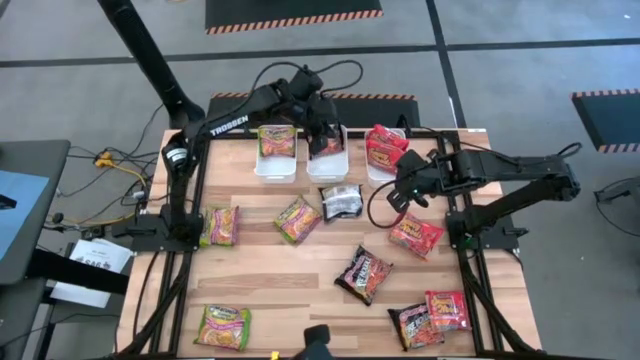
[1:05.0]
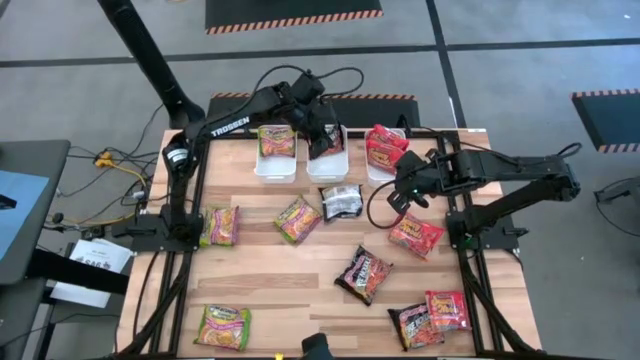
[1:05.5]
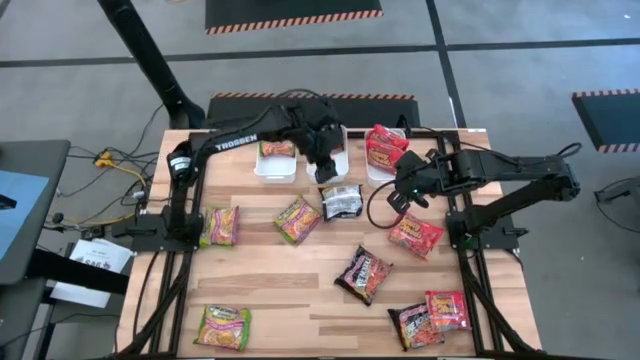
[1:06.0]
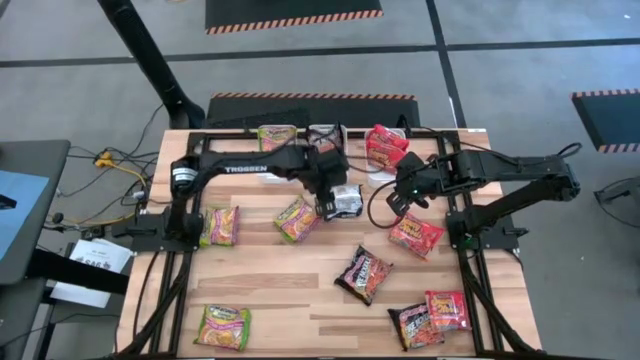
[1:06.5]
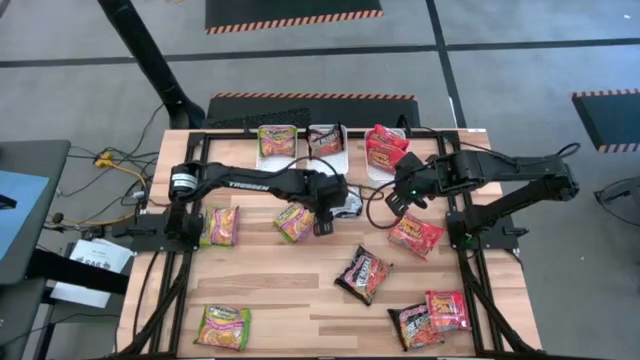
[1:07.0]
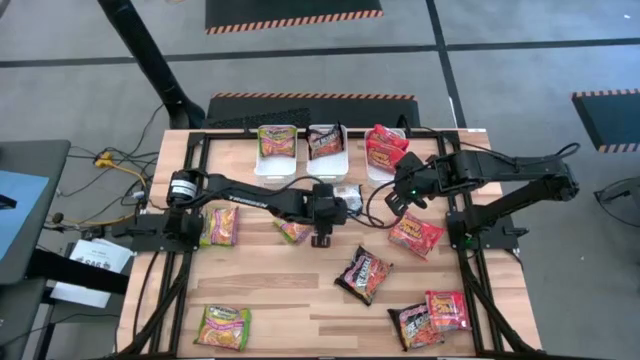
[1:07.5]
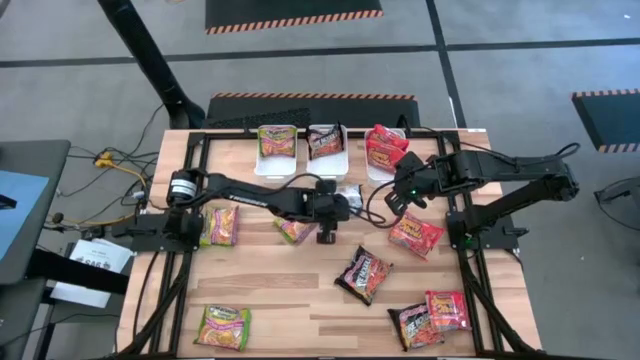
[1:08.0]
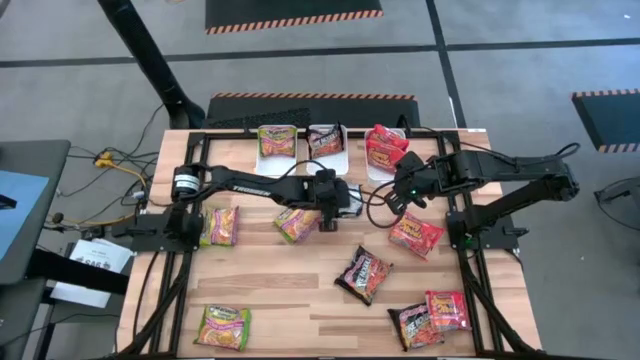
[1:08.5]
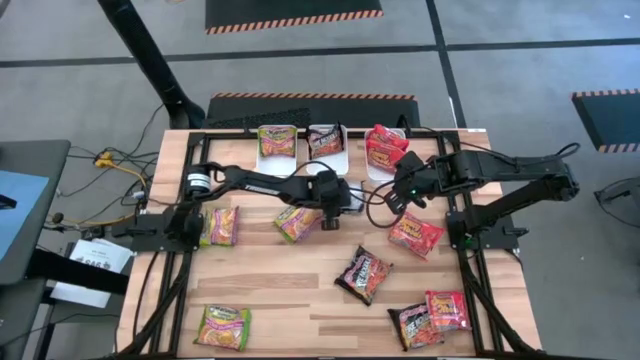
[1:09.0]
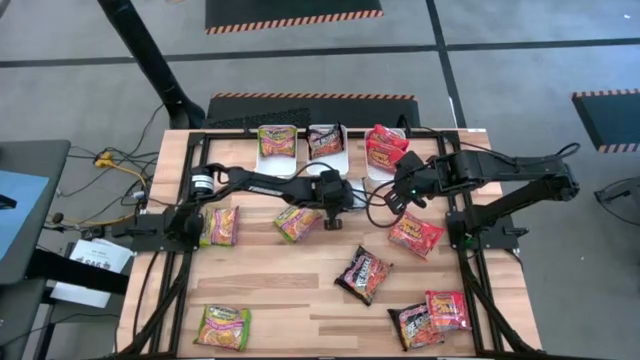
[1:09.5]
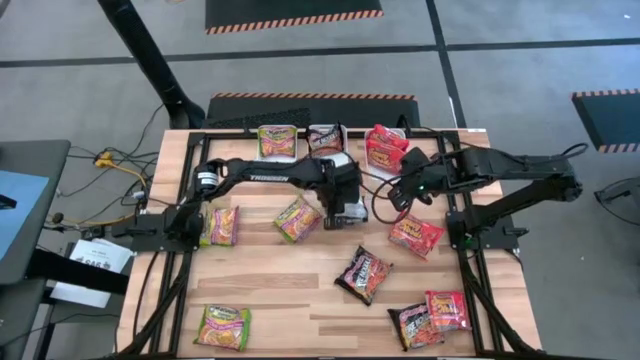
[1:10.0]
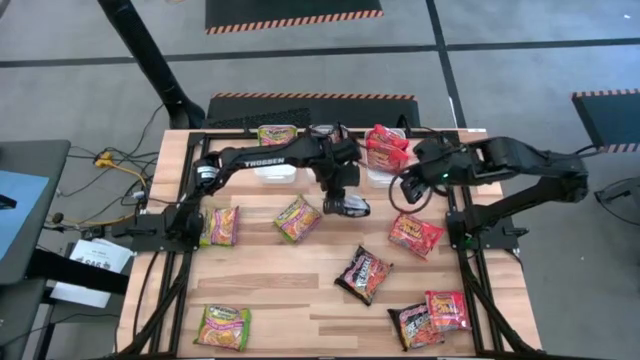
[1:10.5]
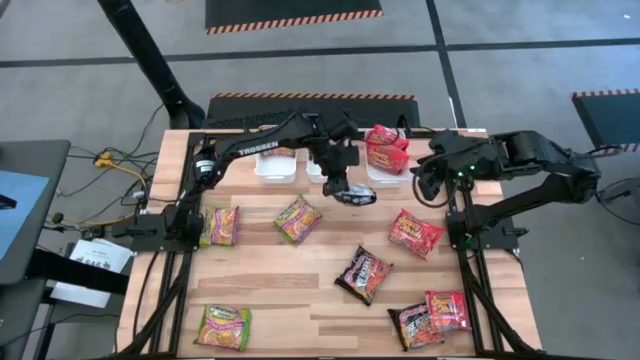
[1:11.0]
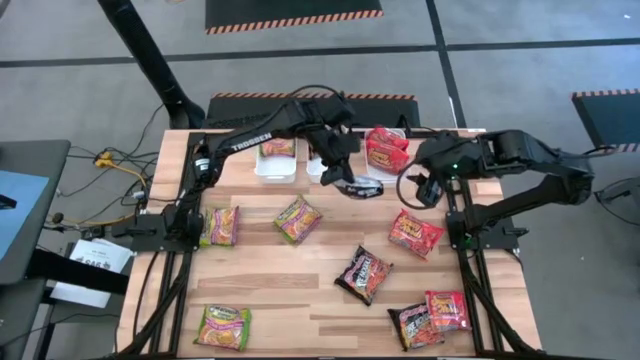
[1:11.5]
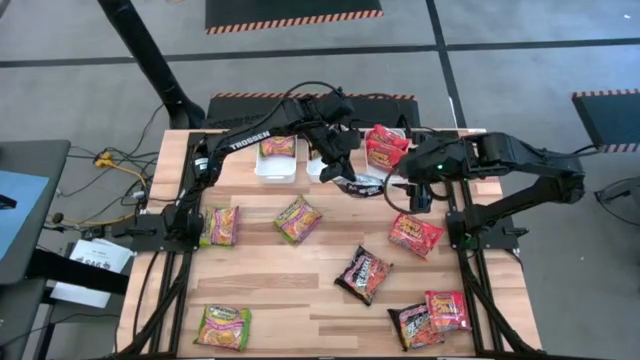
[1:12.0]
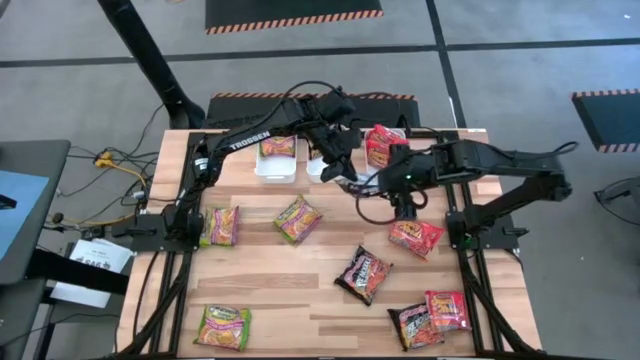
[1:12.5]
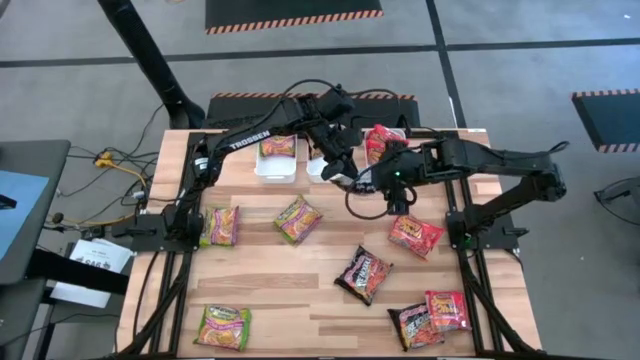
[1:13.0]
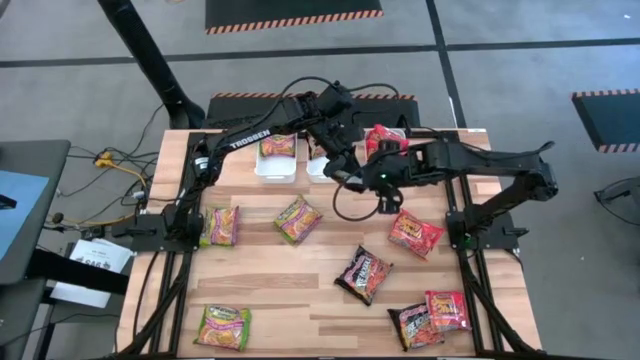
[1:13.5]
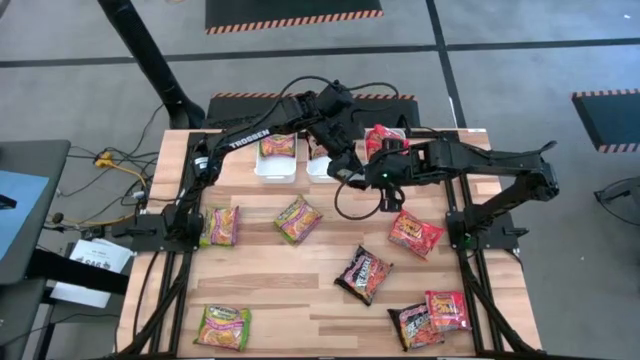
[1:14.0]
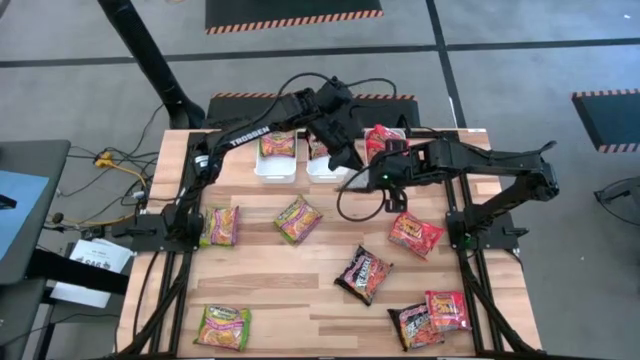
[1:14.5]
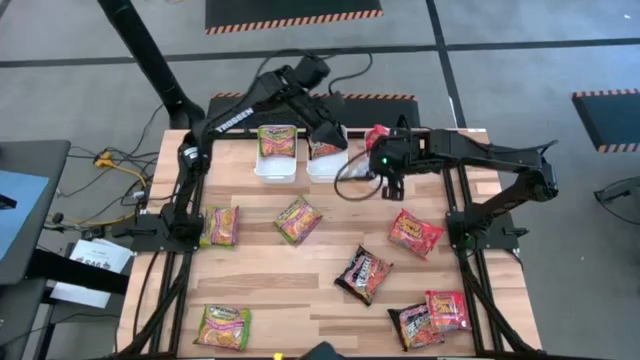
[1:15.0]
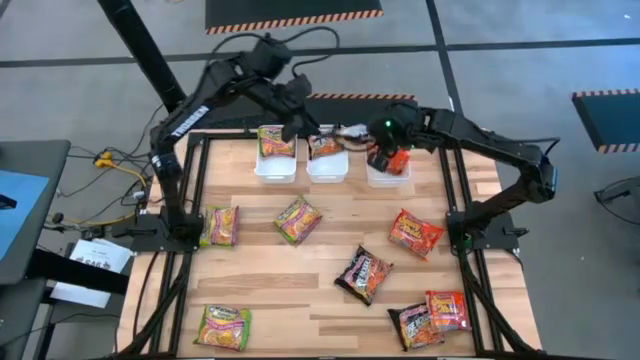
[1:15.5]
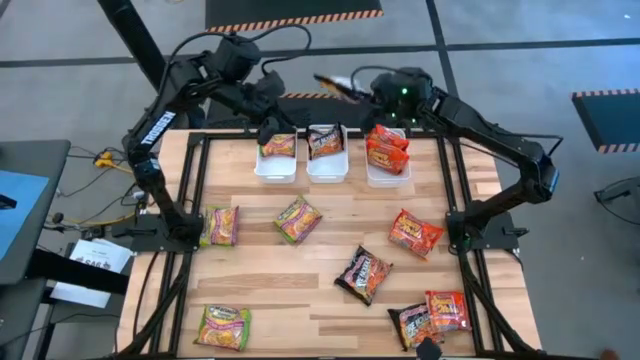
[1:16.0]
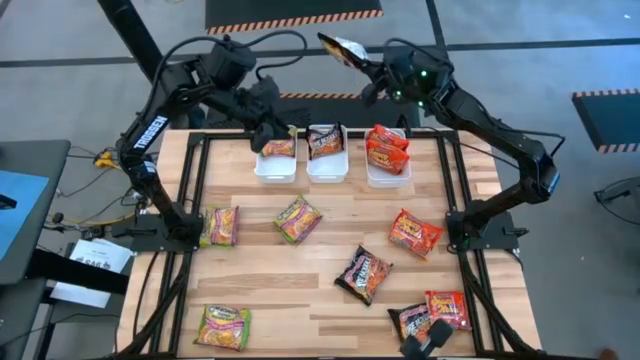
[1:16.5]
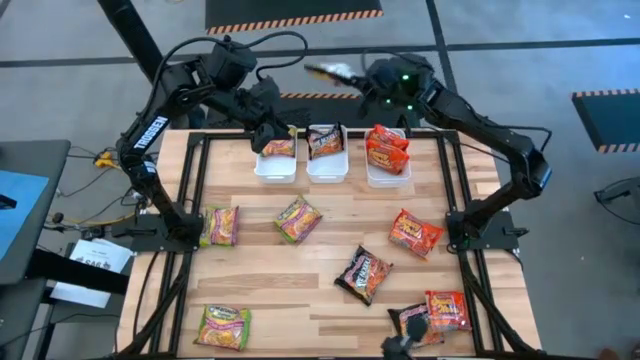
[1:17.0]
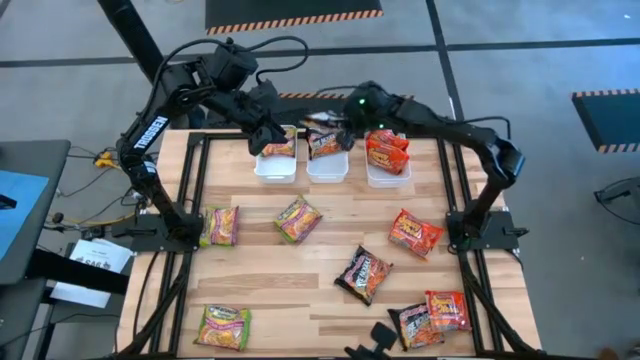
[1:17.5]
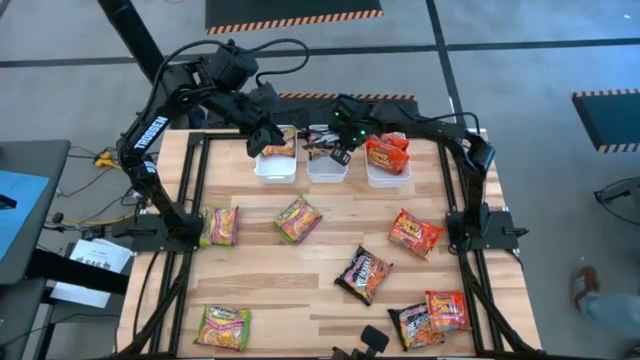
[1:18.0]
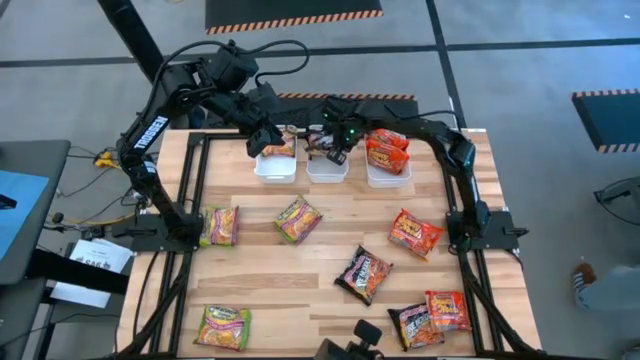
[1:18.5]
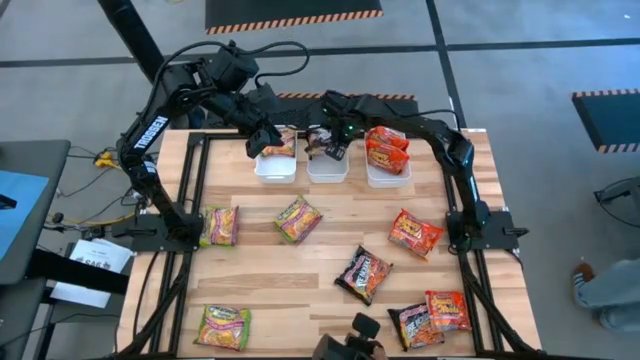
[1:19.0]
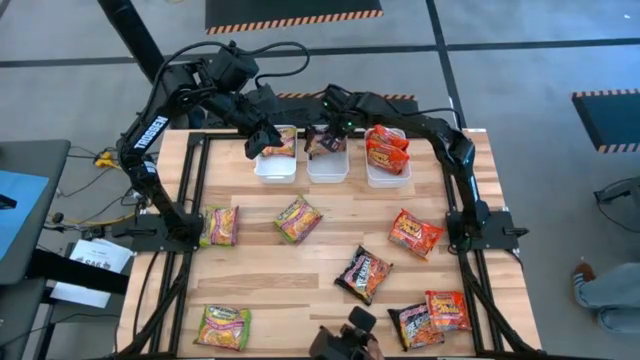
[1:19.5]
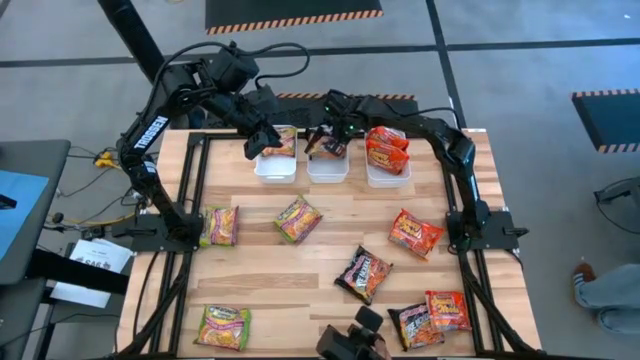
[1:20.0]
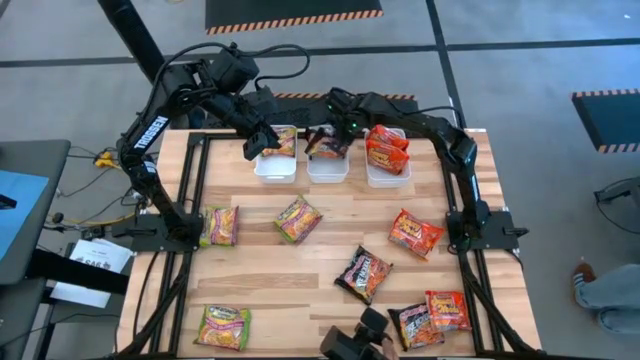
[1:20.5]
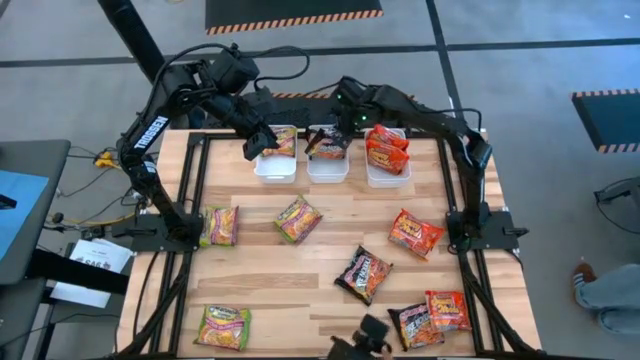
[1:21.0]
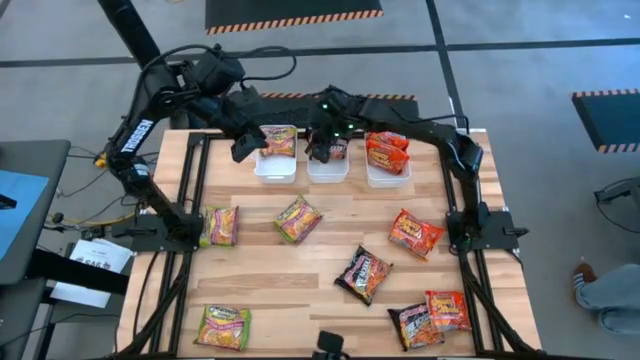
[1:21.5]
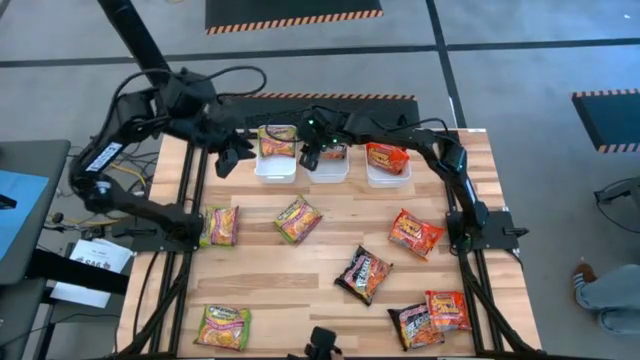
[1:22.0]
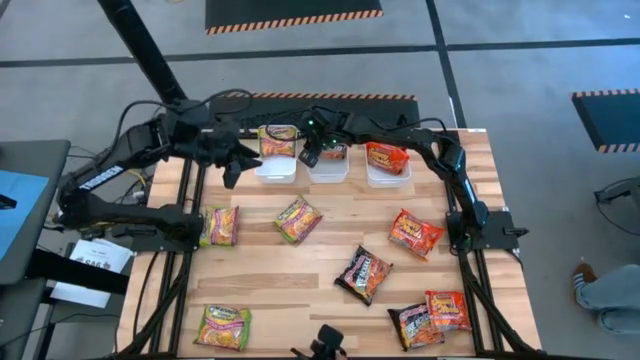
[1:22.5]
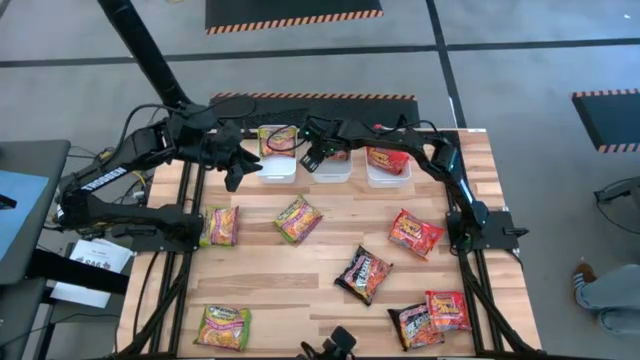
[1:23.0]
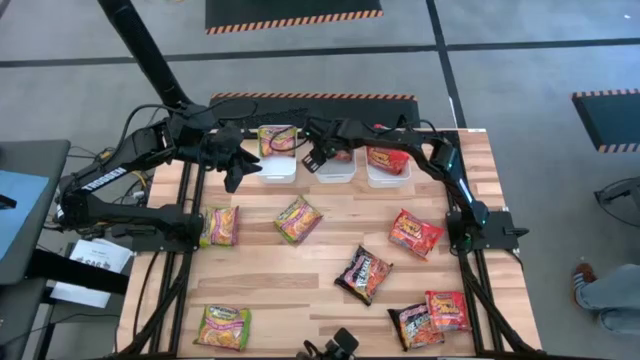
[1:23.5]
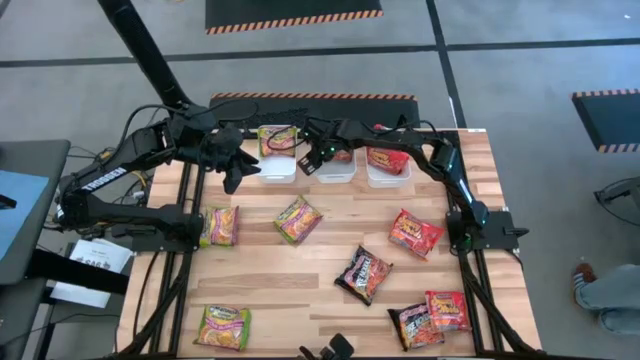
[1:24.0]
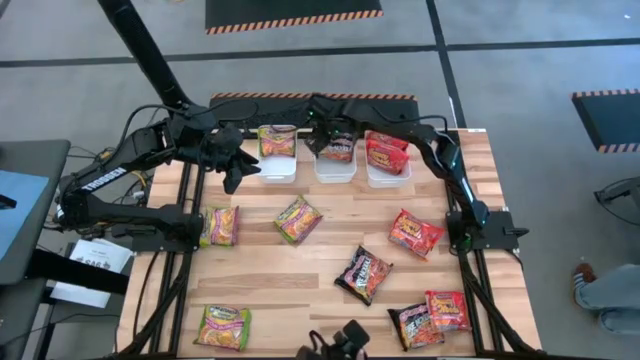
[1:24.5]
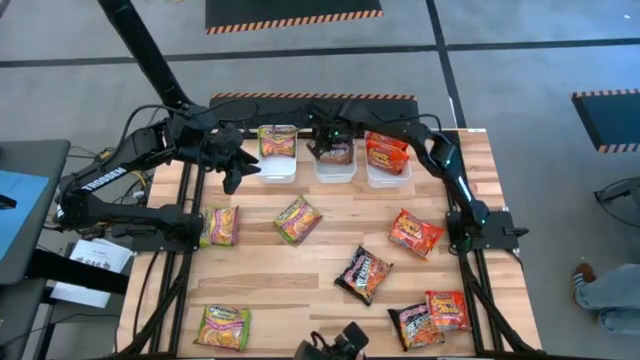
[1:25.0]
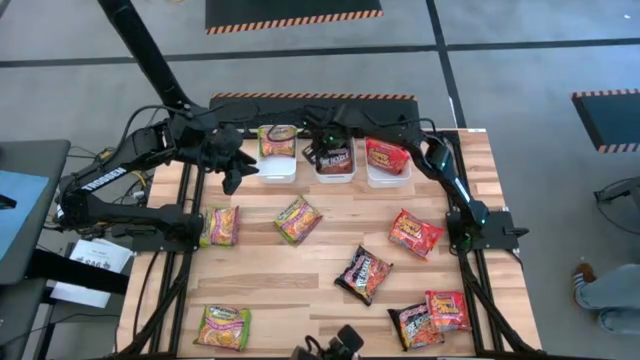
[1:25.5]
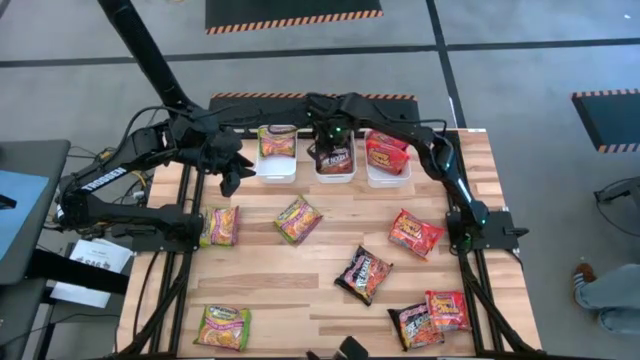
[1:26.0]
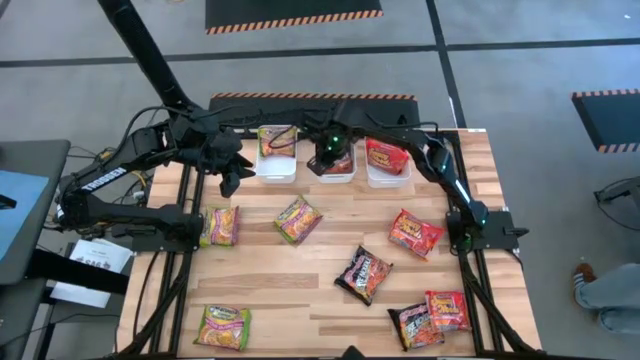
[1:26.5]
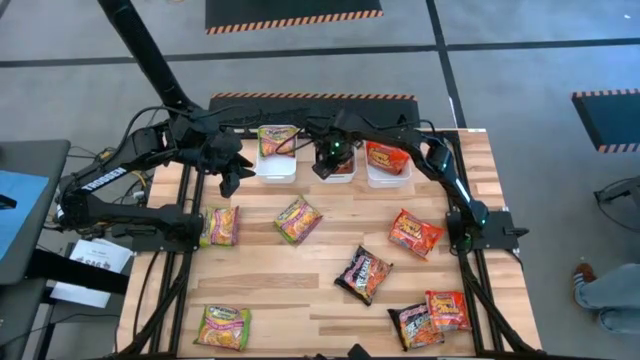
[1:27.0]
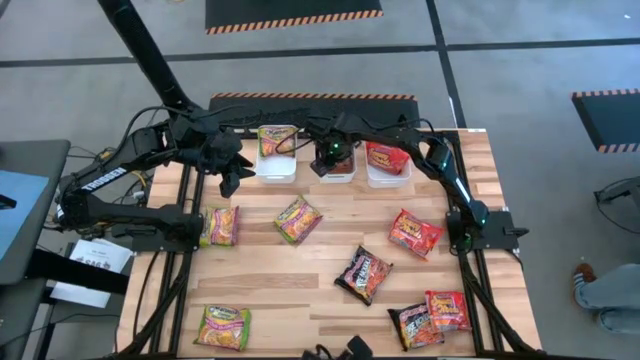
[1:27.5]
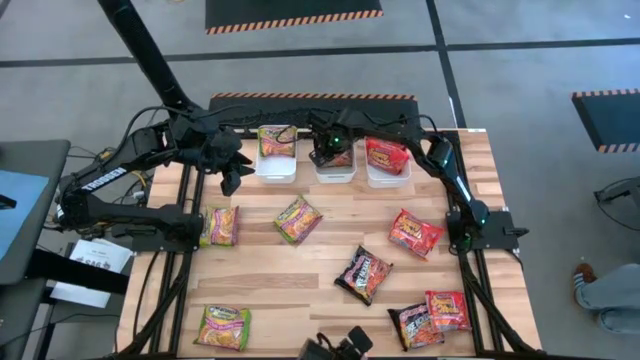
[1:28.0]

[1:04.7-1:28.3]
Task: Sort Maruchan noodles
Put the black noodle pack into the middle white bin
